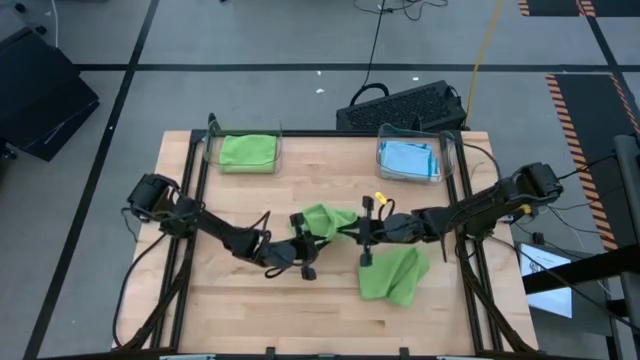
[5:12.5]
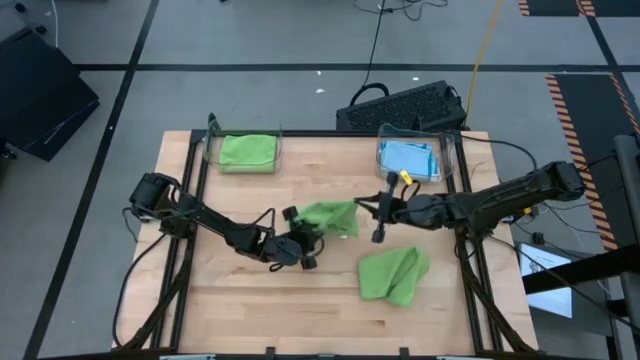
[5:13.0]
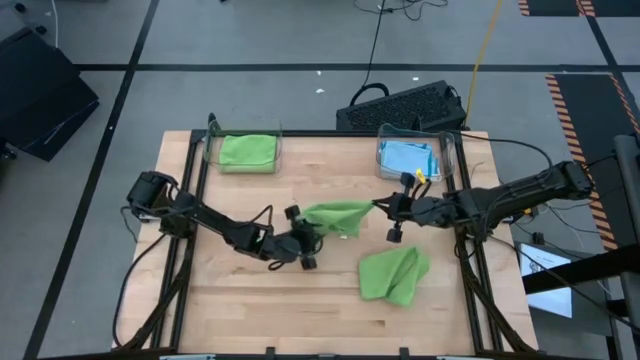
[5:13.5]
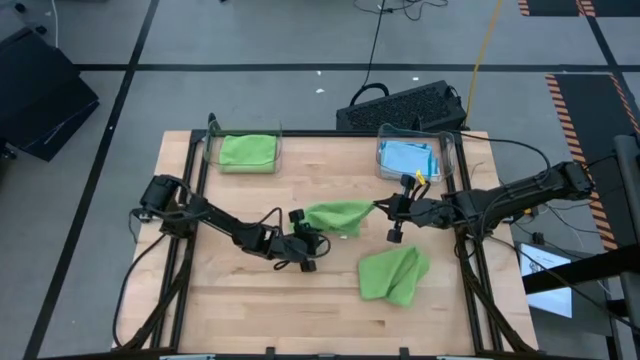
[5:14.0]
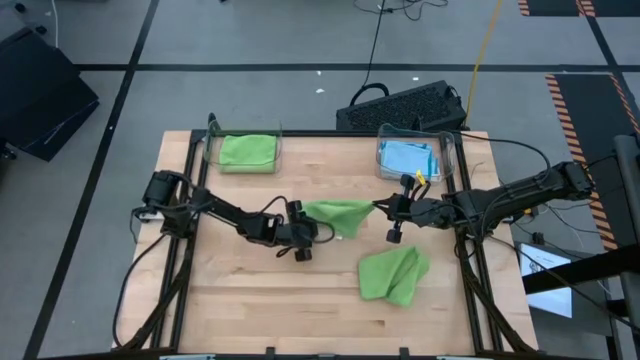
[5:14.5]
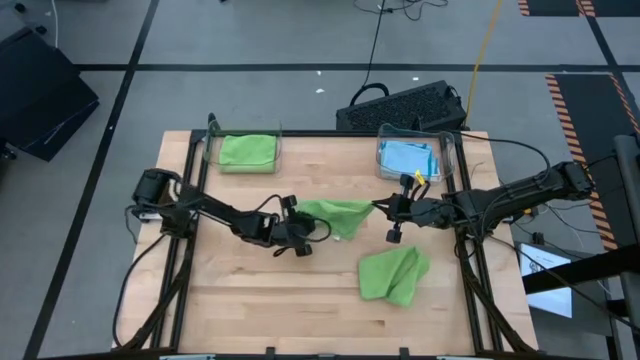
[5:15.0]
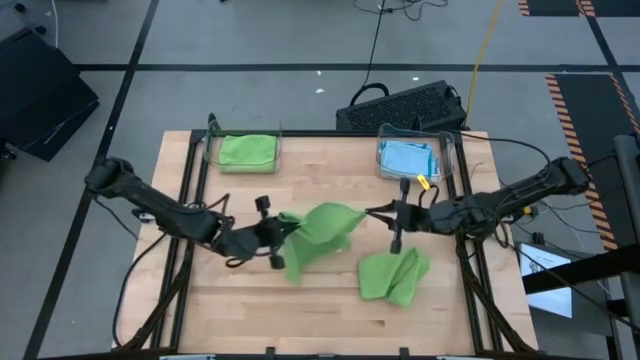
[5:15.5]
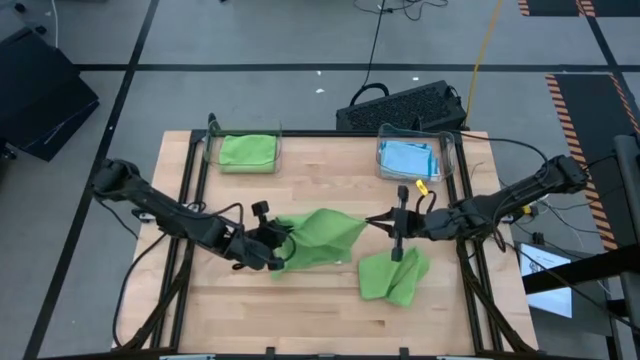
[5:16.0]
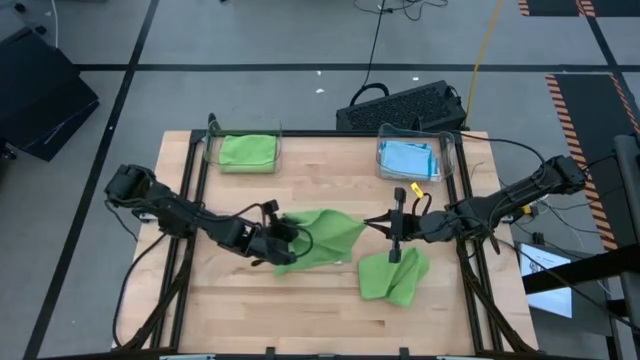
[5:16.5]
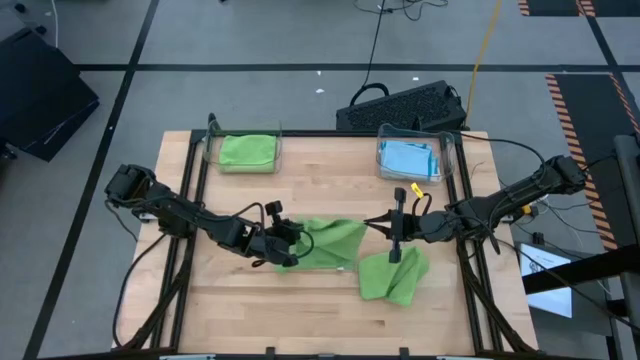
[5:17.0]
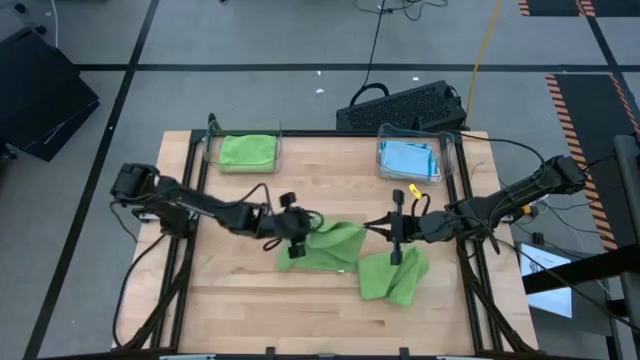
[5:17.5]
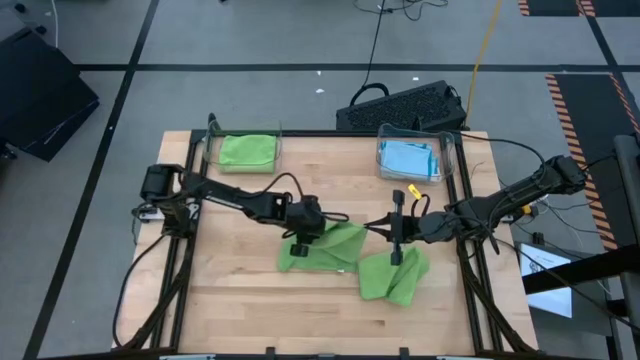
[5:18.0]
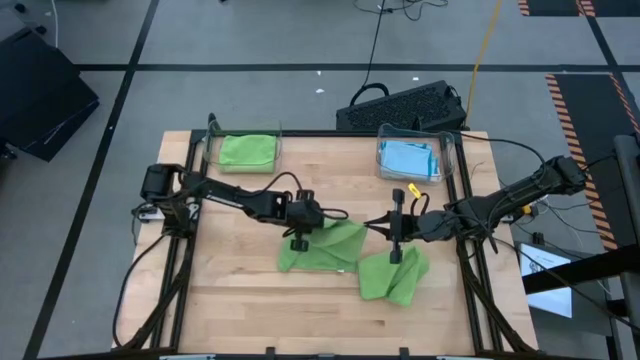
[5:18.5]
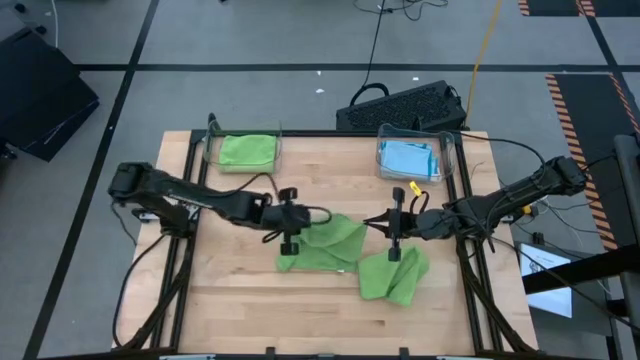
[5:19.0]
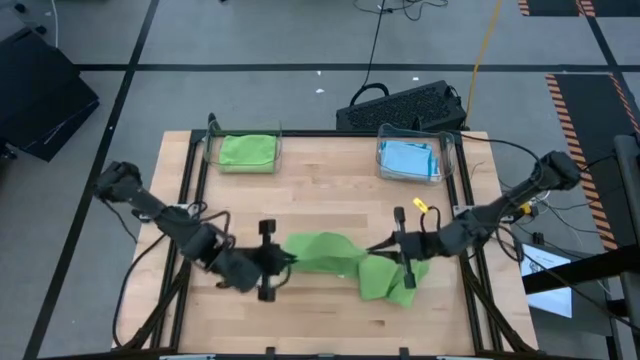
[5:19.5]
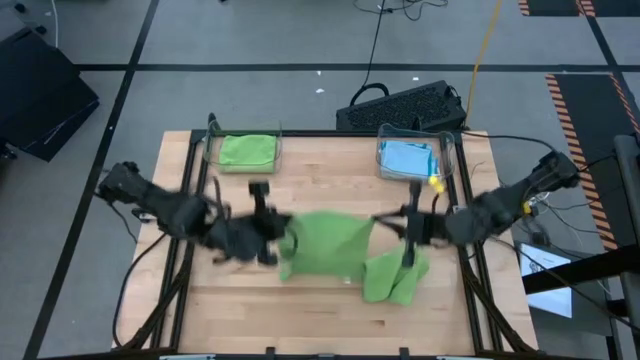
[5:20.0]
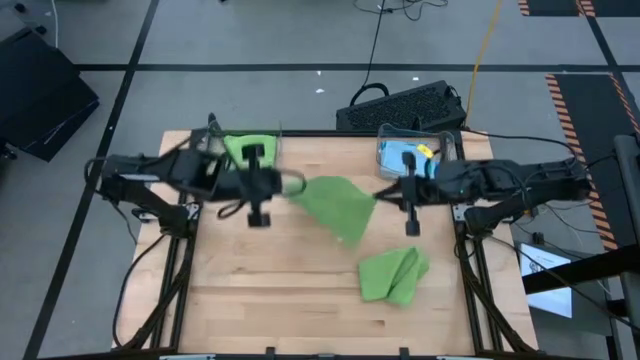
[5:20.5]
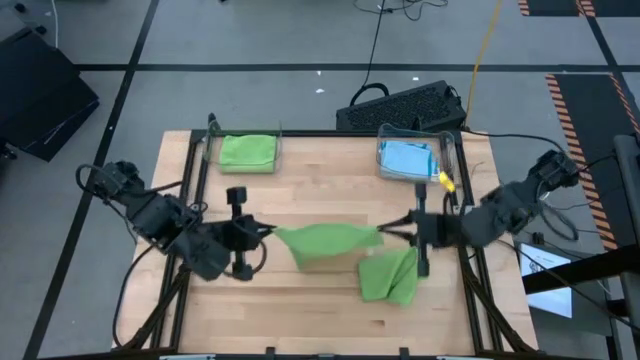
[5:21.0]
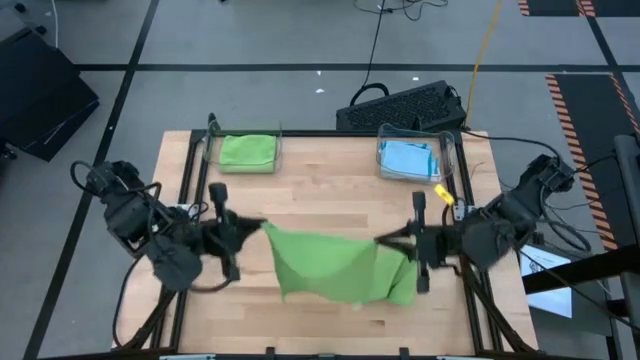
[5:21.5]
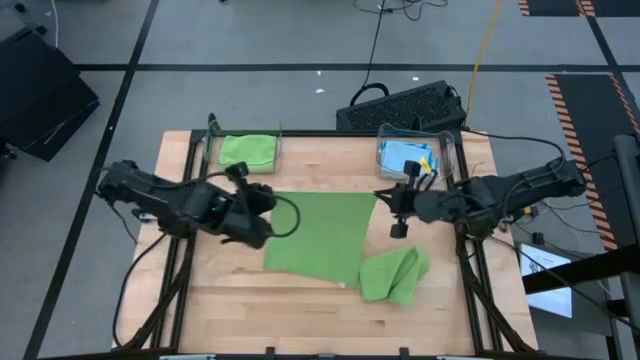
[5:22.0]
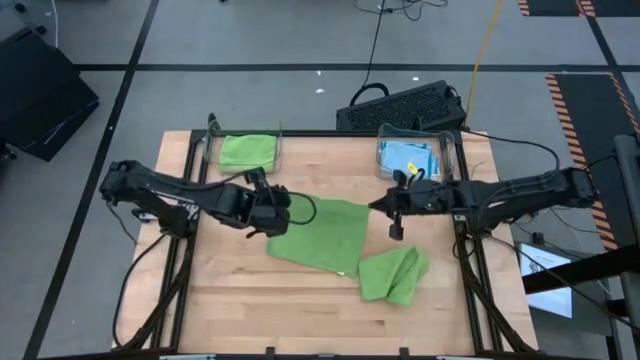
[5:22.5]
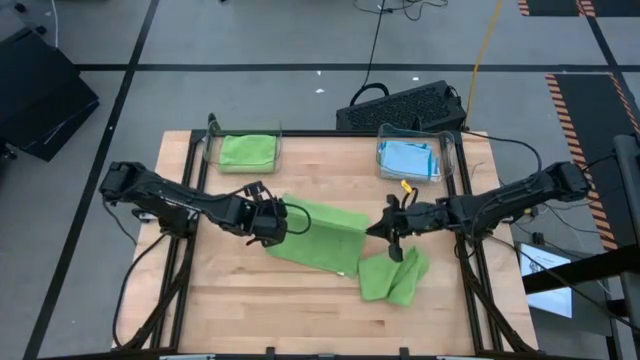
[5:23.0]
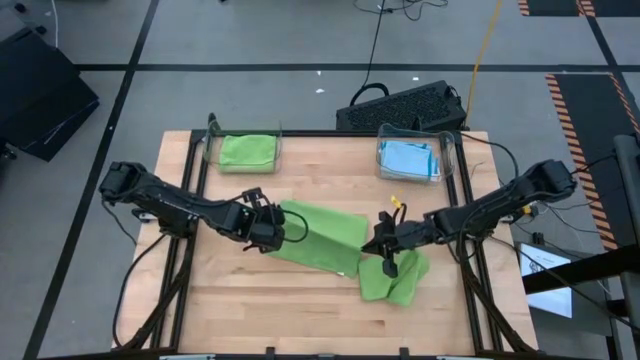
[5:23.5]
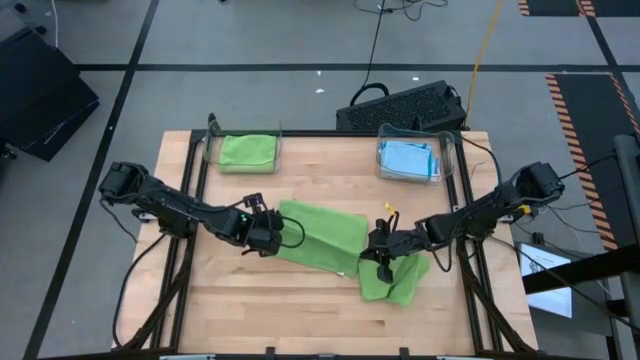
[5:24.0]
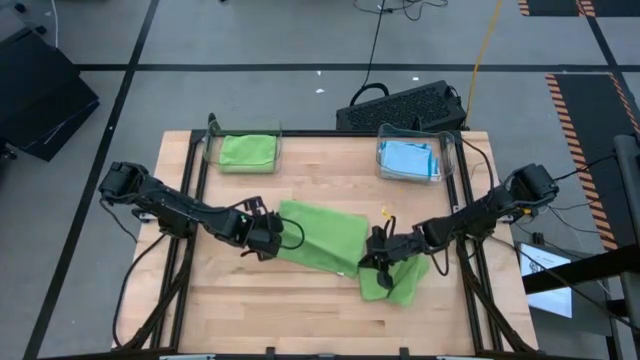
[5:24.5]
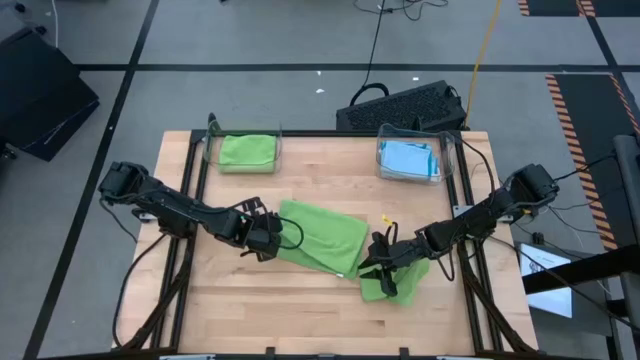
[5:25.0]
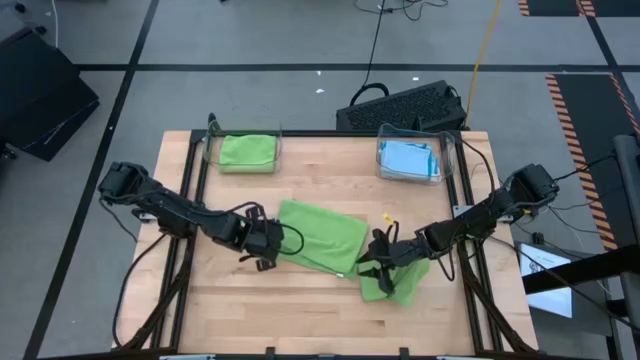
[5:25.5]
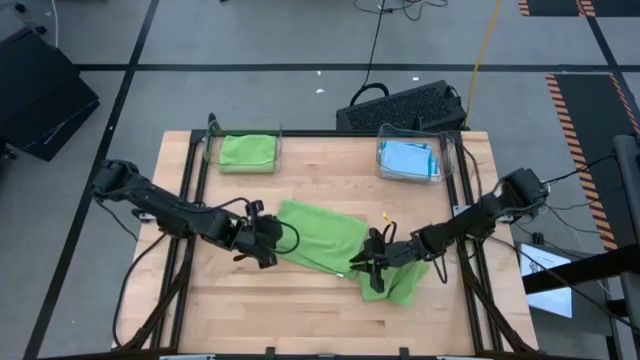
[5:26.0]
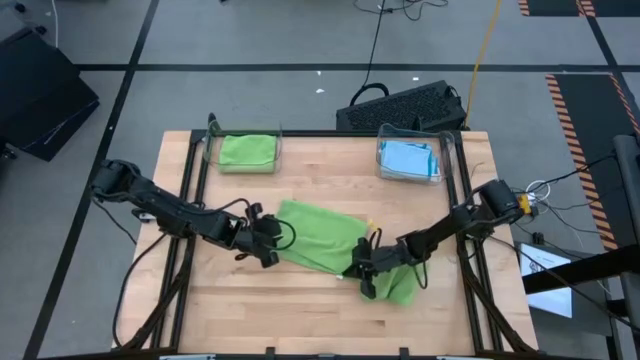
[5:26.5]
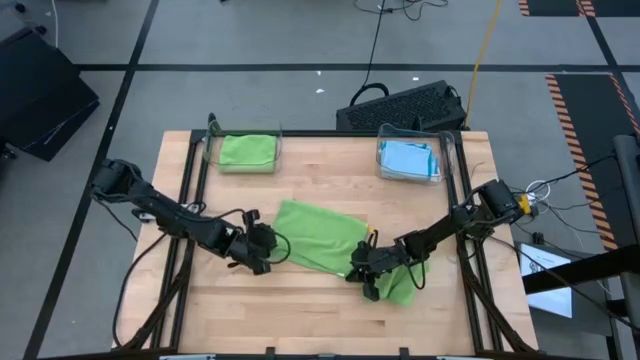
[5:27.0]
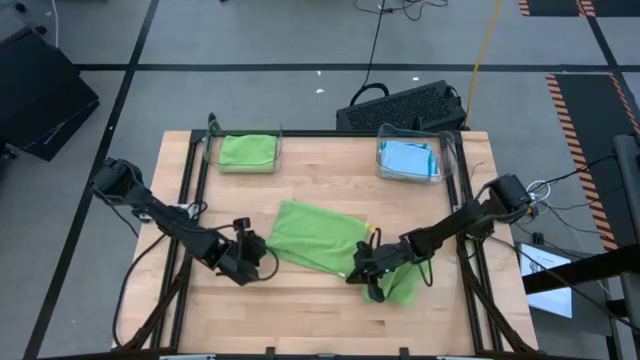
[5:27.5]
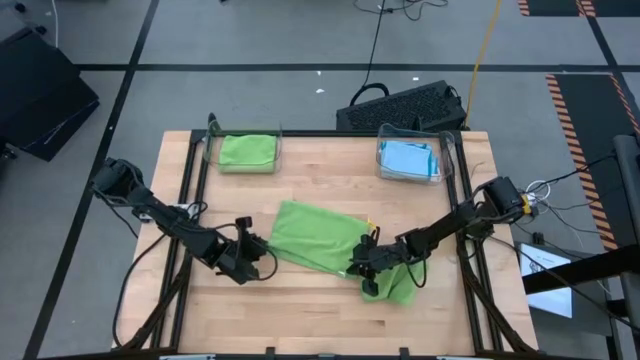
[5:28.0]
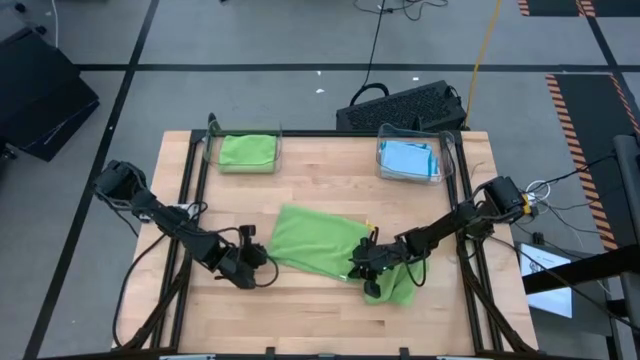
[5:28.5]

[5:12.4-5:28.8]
Task: Fold microfiber towels
Fold the left green microfiber cloth

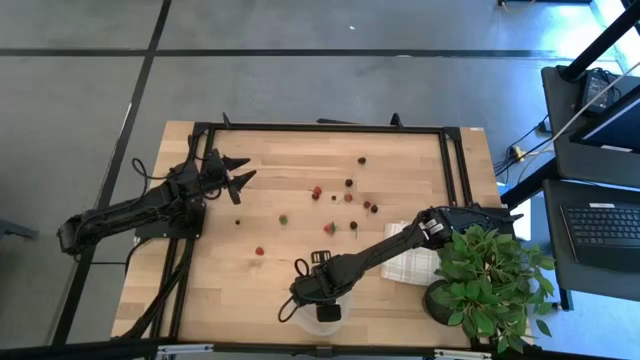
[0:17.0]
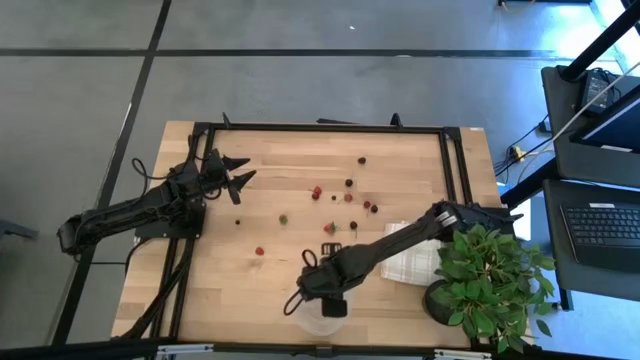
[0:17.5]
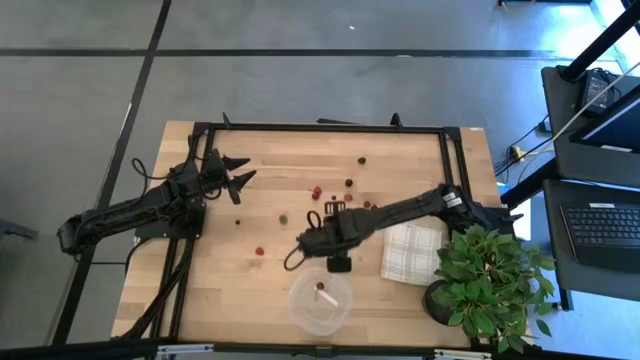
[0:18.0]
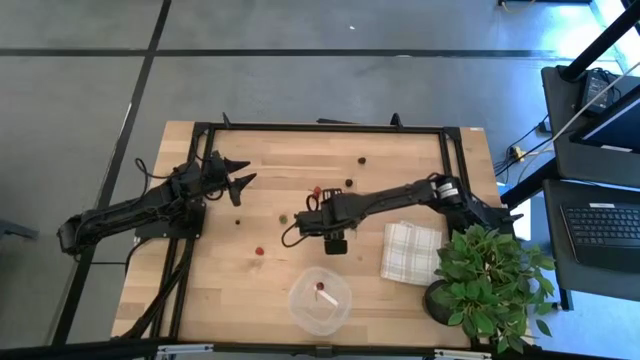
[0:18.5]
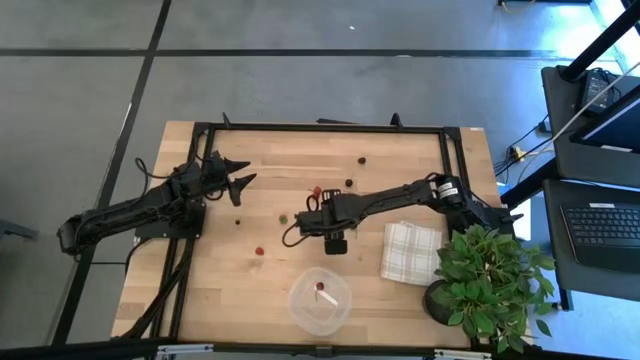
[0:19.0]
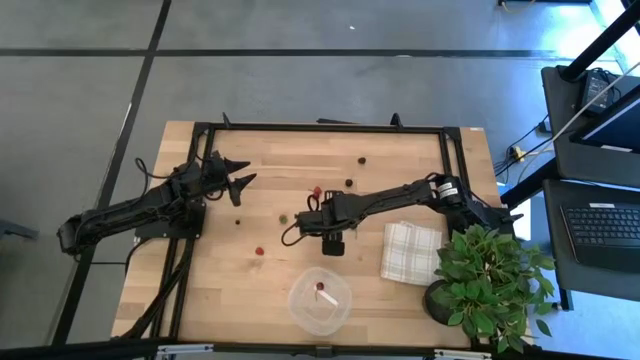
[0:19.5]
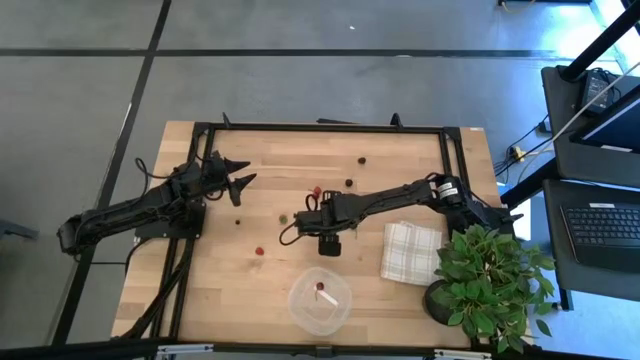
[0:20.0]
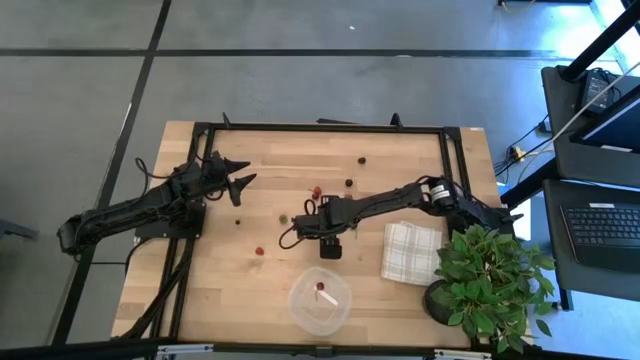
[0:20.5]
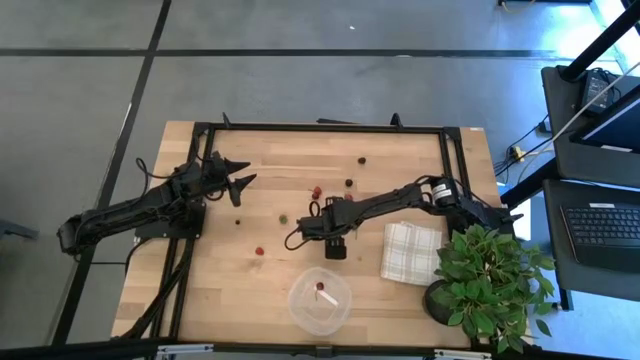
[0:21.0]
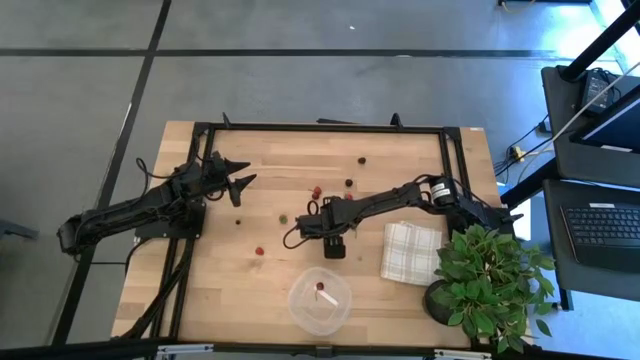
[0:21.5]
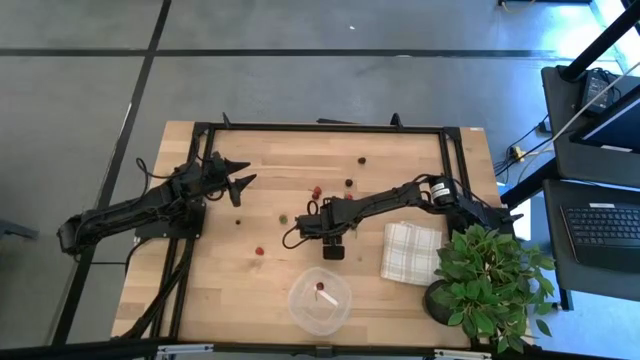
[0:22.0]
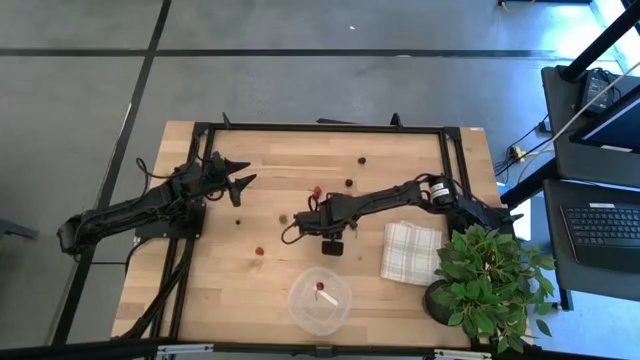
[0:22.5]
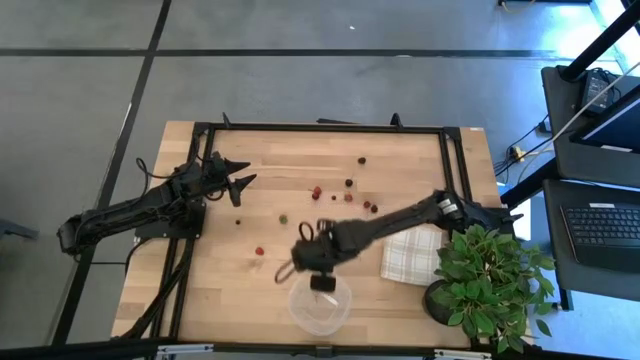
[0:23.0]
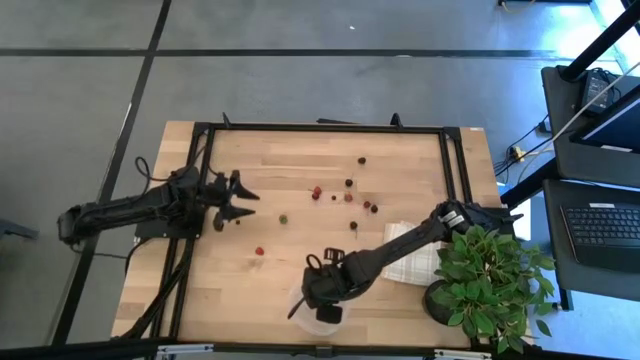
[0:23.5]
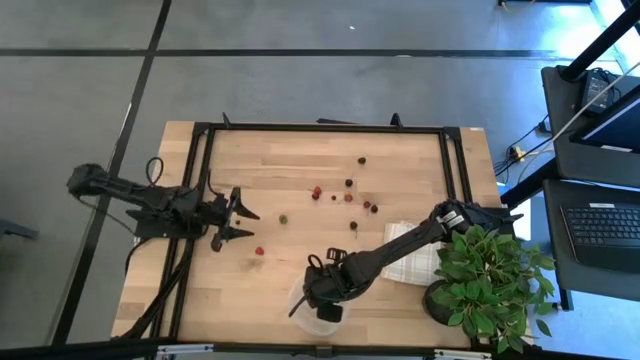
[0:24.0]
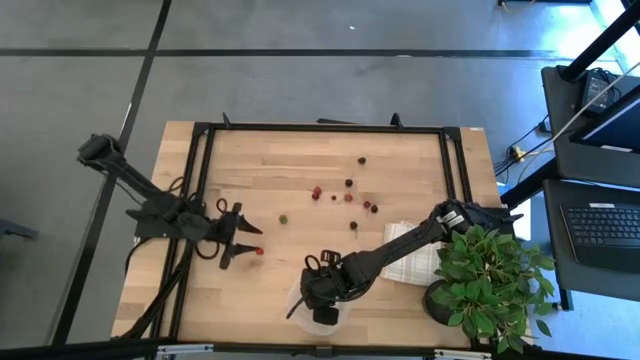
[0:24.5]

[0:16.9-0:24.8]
Task: Pick and placing Produce into tupperware
Put the red strawberry in the bottom transparent bin
